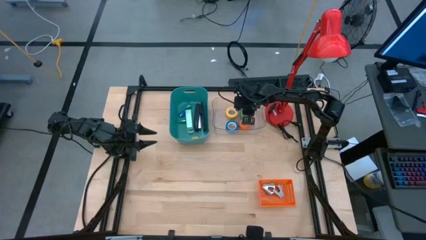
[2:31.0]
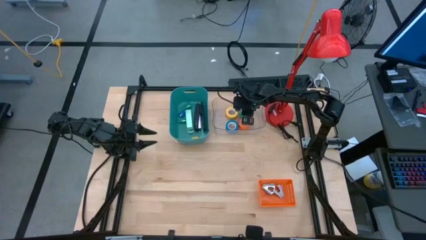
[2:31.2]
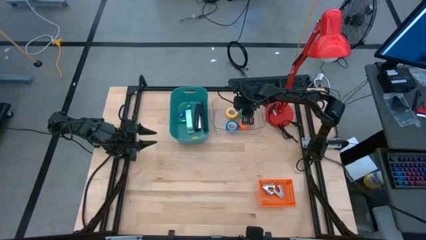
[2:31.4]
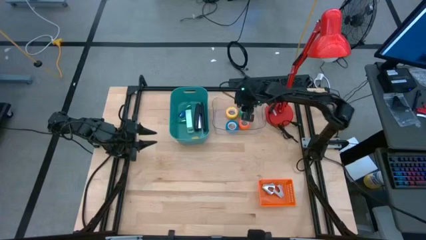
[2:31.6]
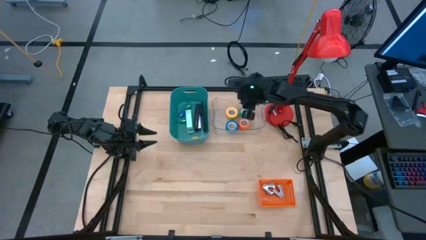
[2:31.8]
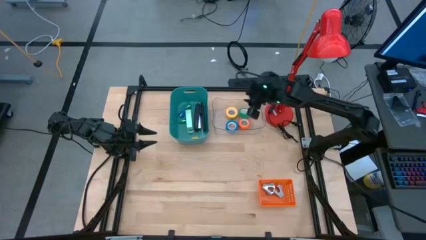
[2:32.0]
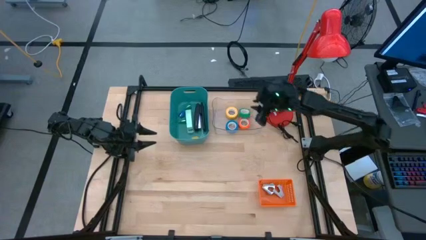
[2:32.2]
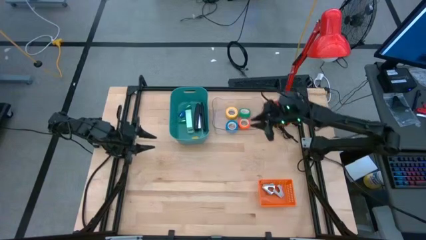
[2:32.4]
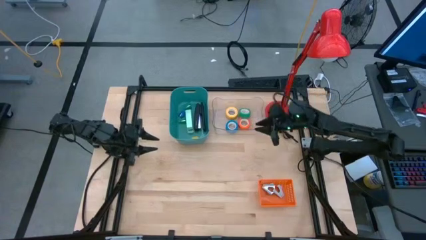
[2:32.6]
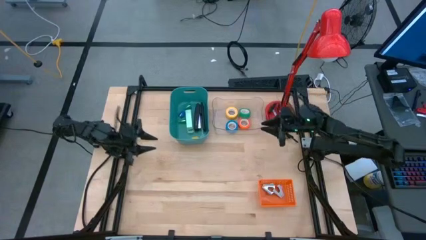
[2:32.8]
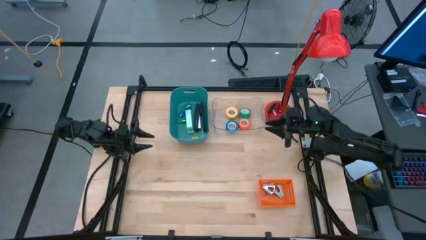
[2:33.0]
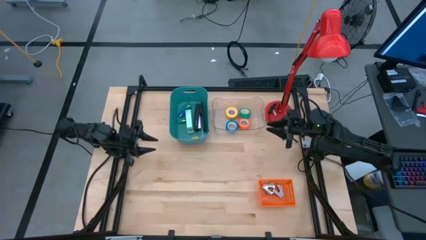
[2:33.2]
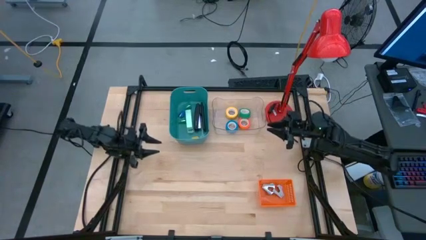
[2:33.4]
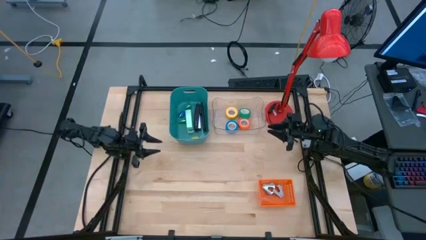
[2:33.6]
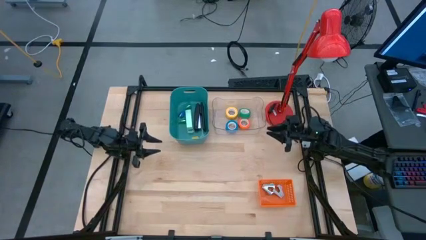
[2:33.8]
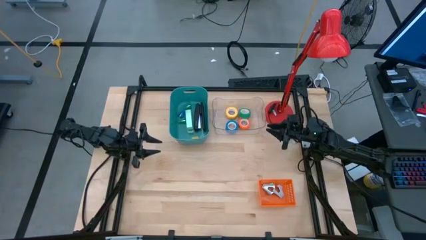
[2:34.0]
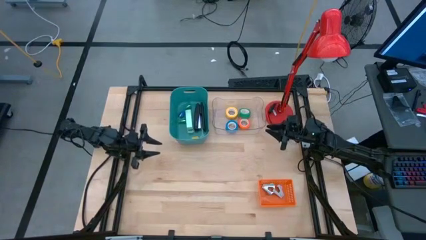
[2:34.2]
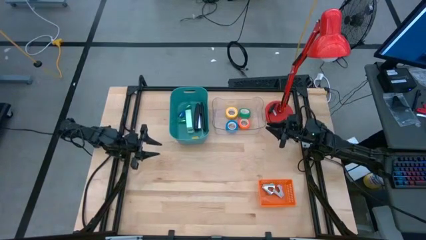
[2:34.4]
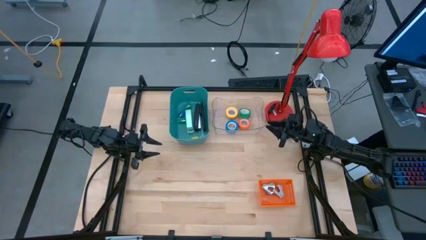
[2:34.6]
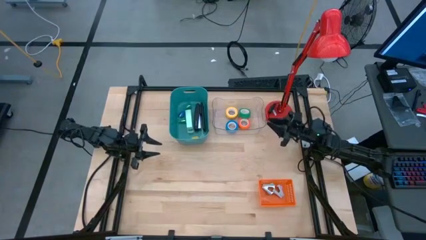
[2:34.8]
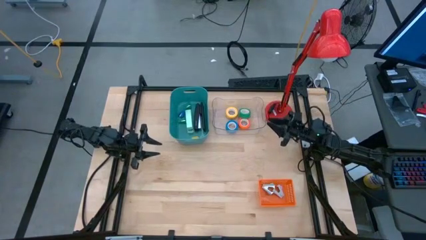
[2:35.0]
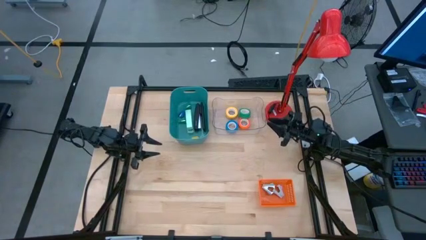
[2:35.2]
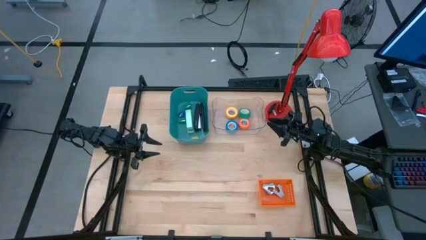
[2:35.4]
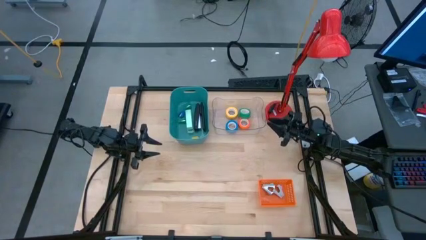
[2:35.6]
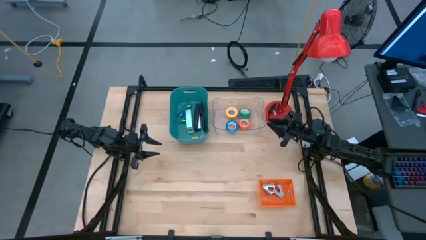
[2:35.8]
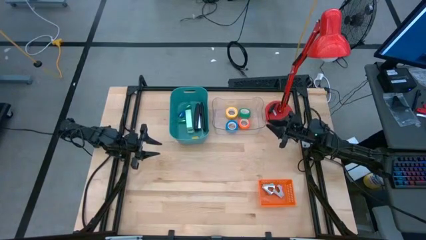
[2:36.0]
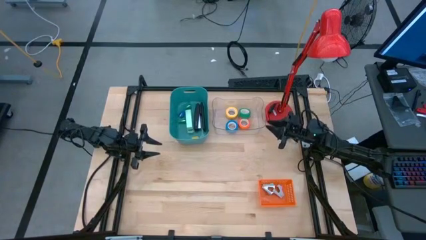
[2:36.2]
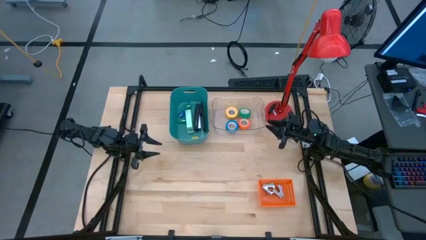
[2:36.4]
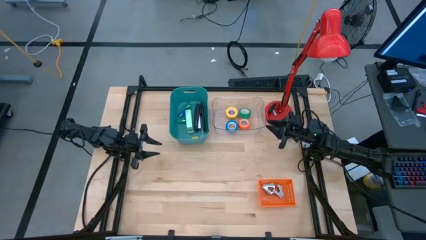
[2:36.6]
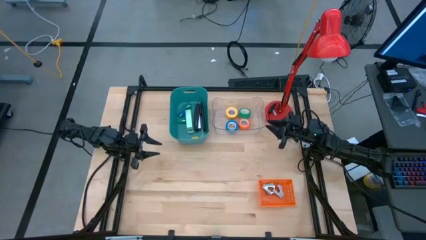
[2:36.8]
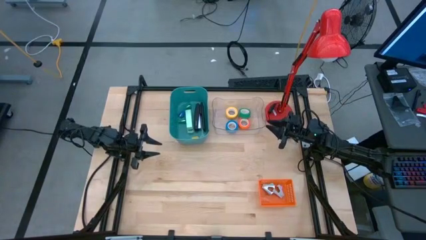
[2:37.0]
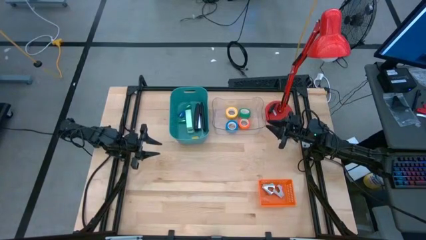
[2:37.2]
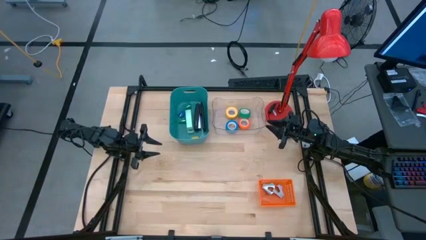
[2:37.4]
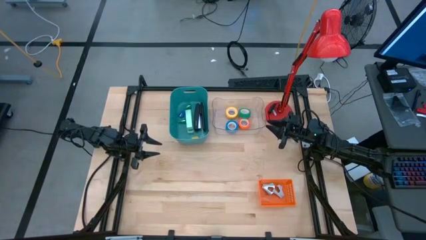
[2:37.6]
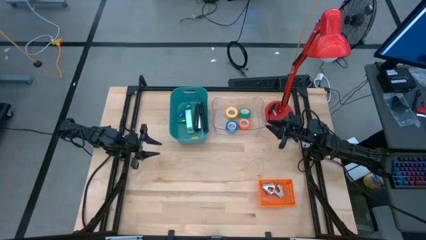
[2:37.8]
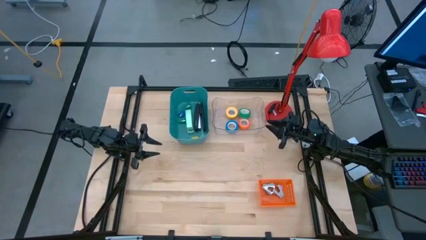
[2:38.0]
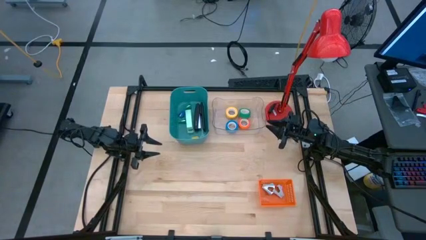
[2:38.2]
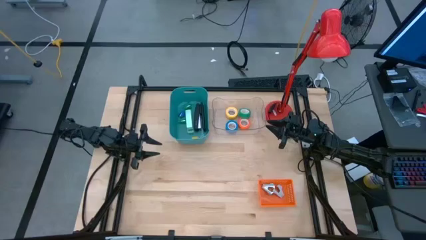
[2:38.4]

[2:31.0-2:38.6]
Task: Pick and place Stapler, Stapler remover, tape
Return to Home Position

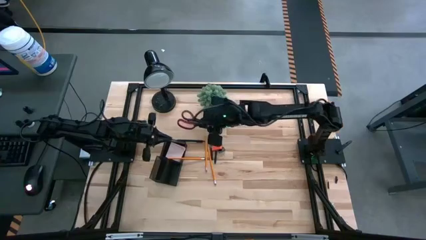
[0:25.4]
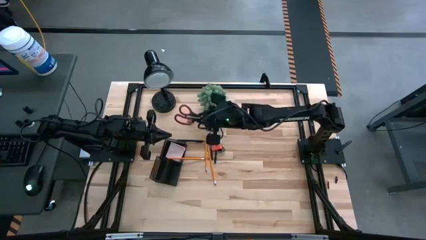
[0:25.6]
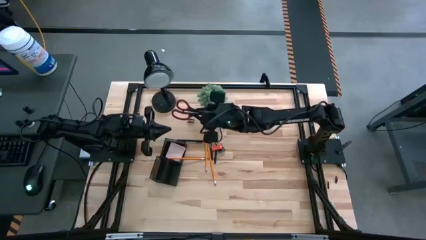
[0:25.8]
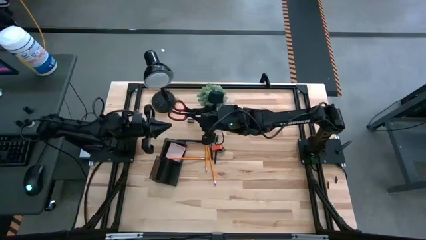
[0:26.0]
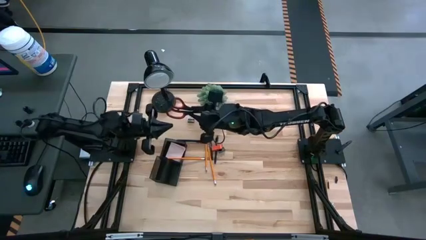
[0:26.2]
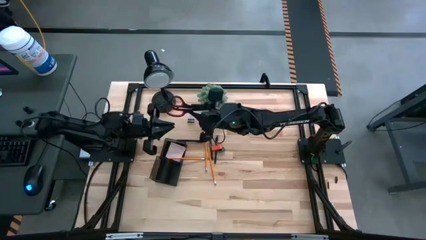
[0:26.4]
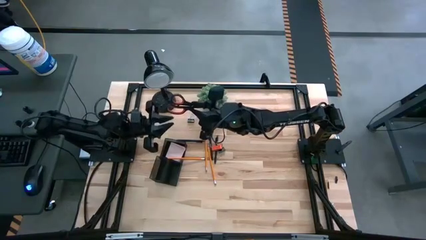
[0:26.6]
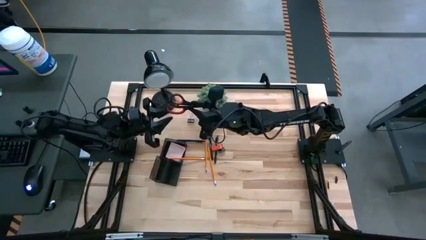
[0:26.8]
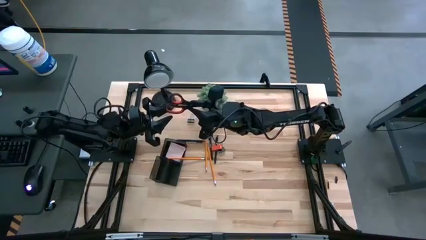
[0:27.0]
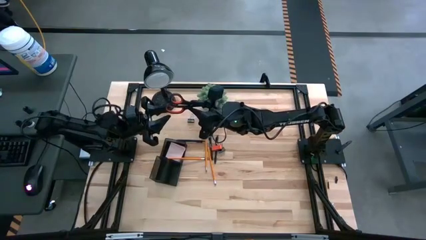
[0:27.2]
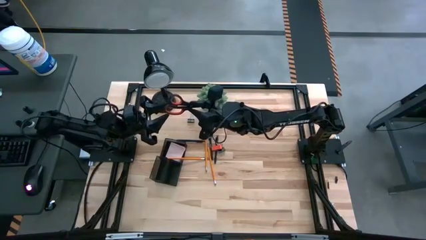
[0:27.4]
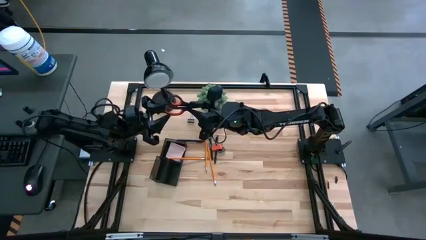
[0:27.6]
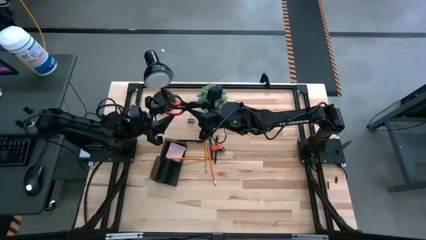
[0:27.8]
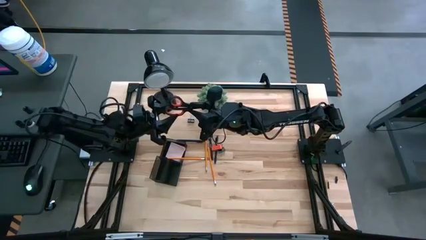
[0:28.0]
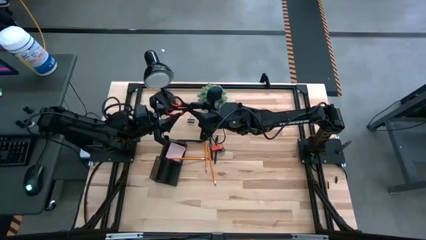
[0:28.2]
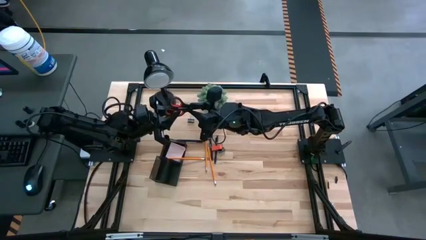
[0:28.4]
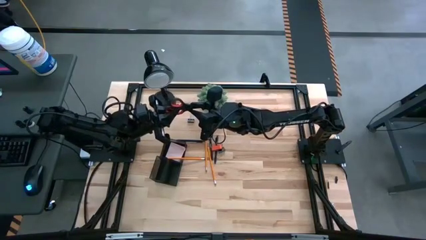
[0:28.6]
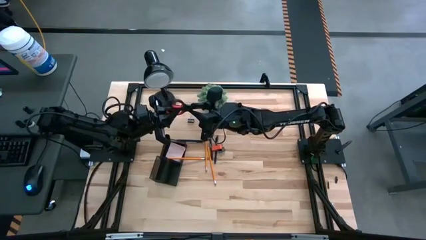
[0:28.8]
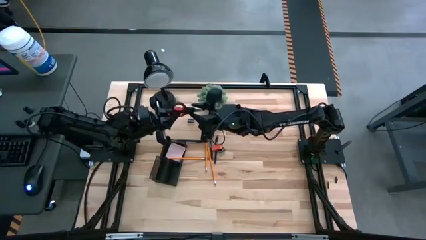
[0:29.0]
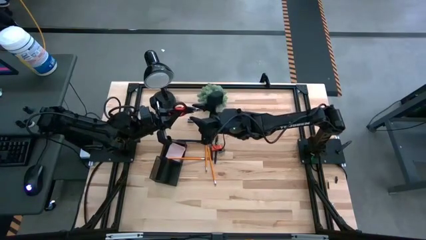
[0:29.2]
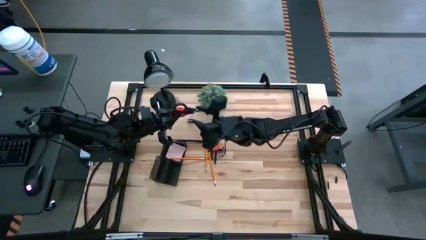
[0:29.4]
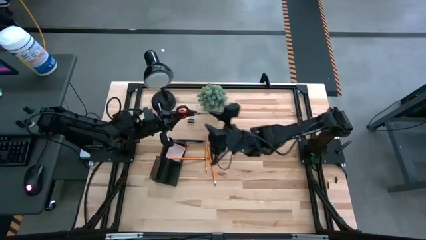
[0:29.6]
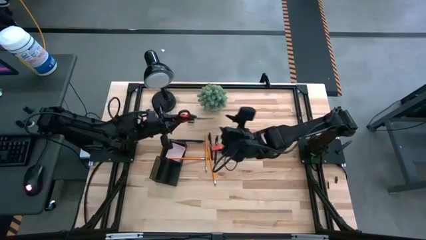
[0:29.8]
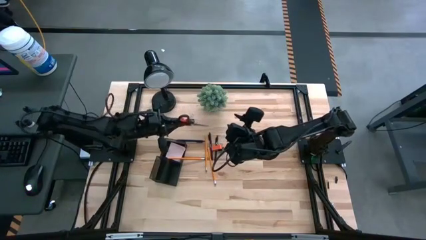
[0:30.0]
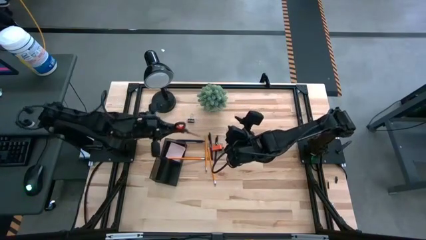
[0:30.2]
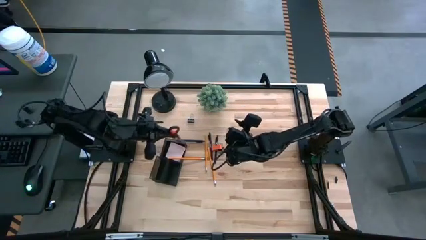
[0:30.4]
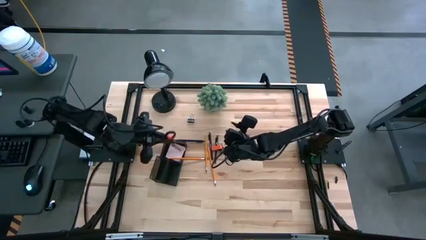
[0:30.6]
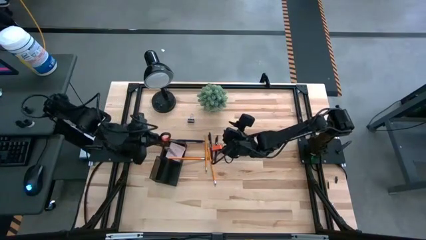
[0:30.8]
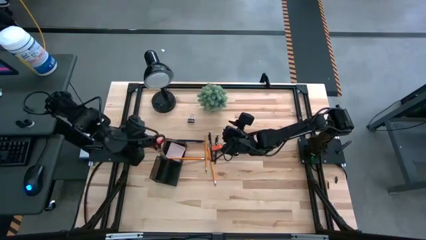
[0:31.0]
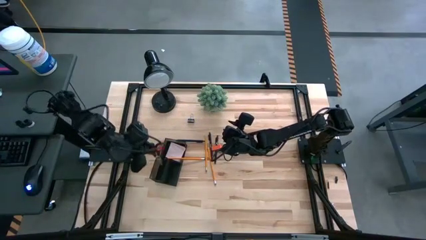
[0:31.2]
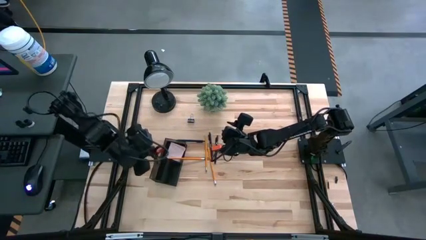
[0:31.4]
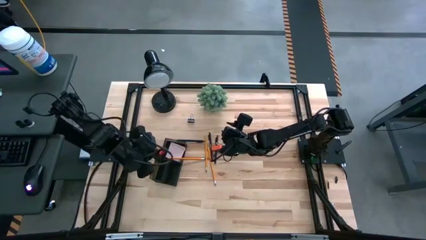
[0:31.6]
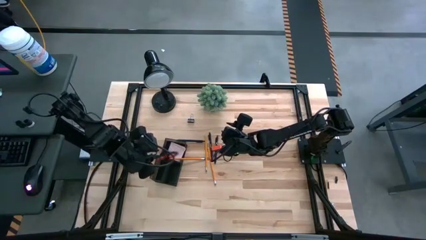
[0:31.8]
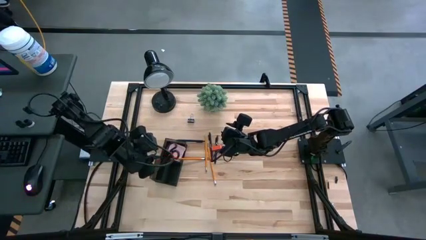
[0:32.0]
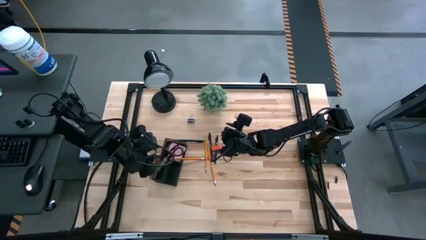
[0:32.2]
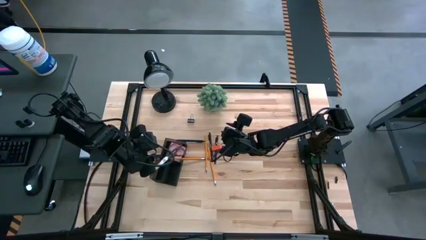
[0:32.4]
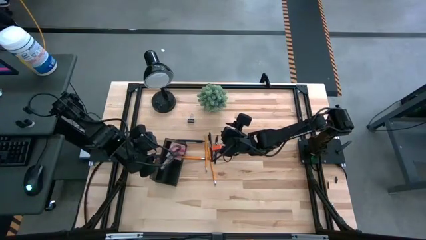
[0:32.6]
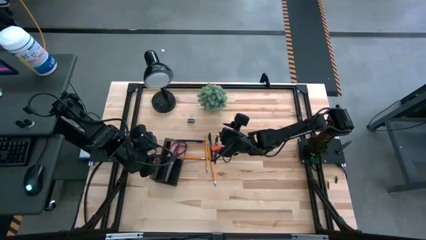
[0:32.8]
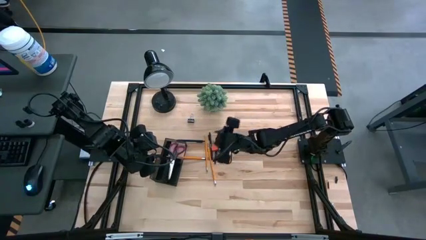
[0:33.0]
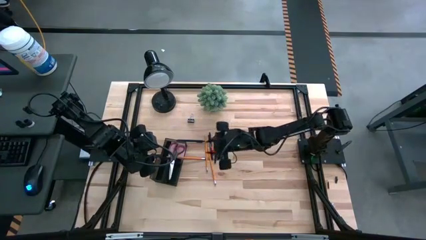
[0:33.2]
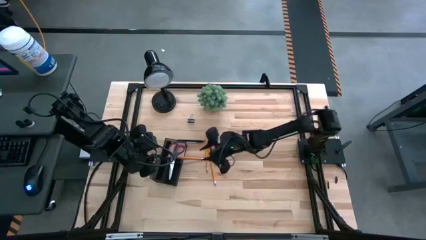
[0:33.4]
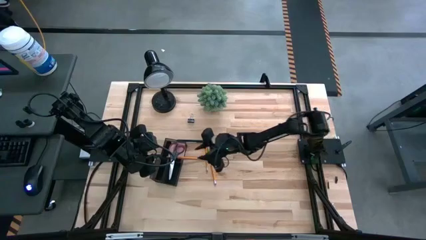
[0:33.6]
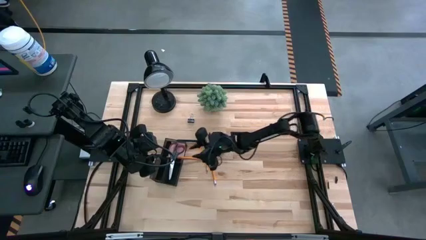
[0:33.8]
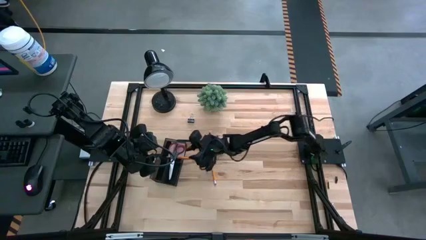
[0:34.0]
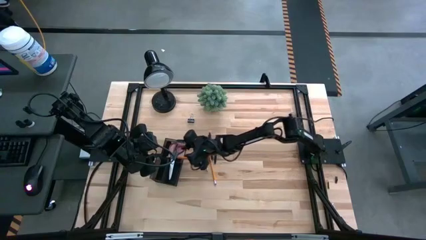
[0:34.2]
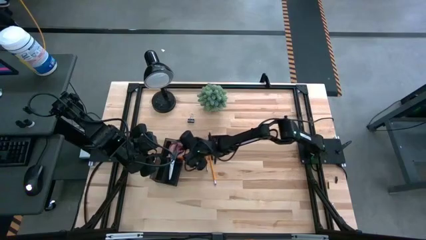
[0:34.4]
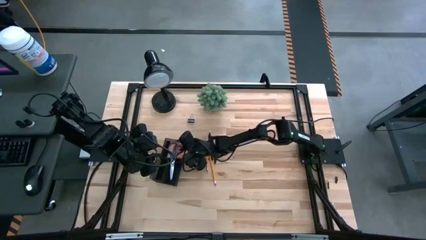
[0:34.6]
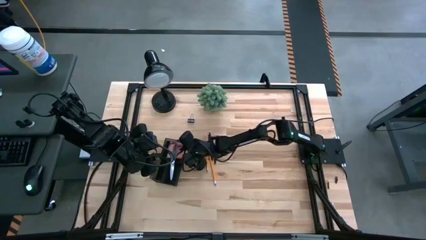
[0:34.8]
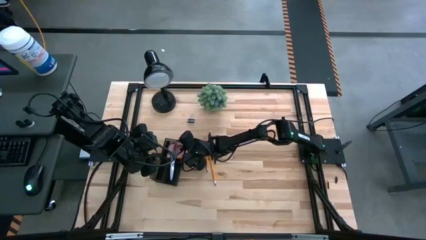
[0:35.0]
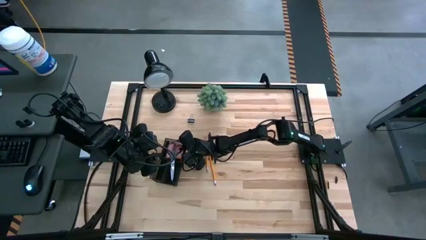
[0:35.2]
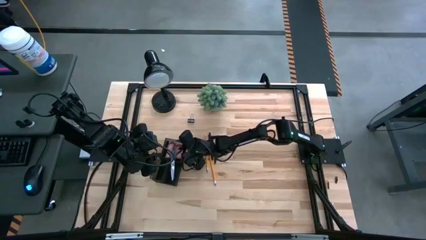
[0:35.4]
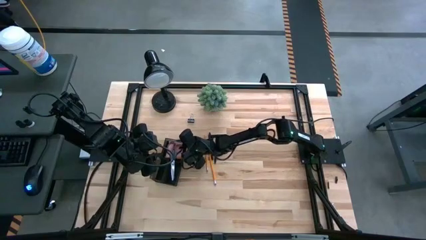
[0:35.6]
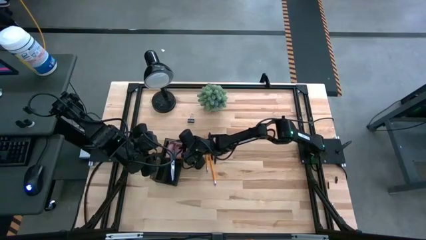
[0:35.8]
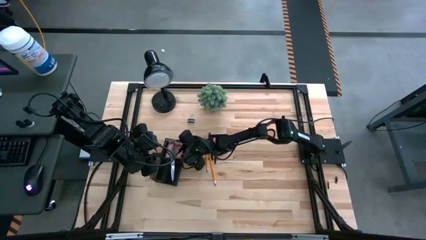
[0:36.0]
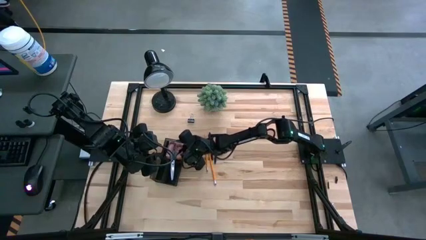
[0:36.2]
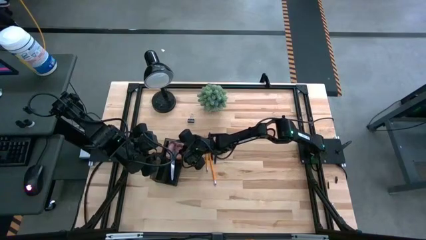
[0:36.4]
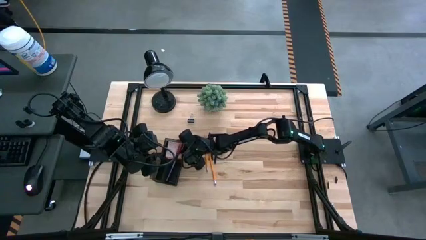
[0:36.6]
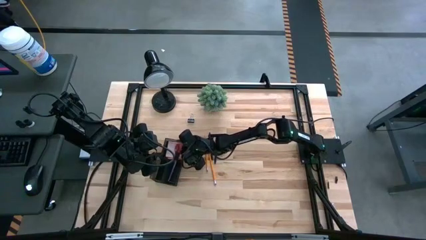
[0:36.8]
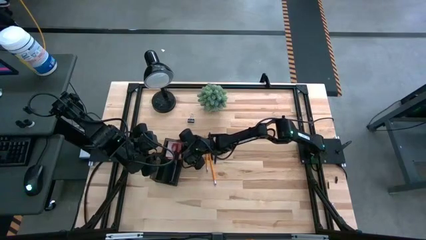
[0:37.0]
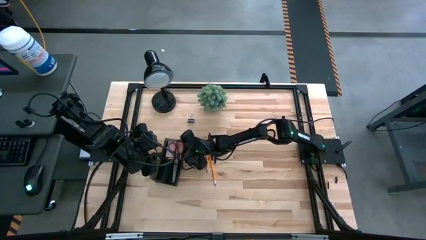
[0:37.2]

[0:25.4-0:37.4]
Task: Pick and place office supplies into organizer
Put the black scissors into the desk organizer
